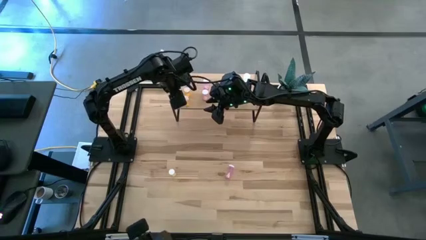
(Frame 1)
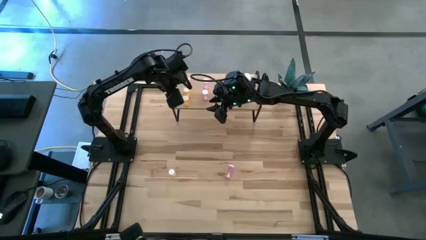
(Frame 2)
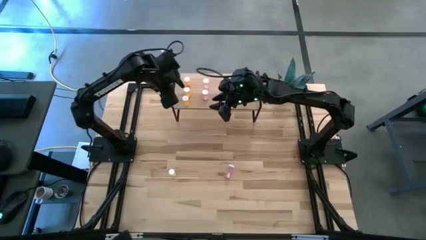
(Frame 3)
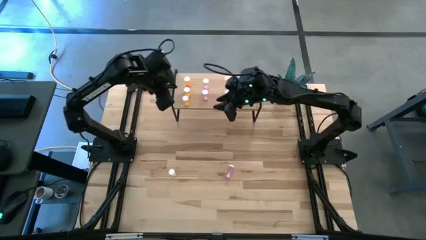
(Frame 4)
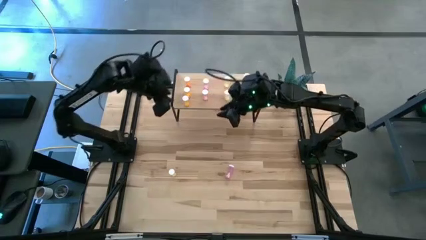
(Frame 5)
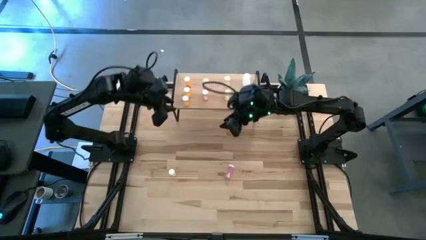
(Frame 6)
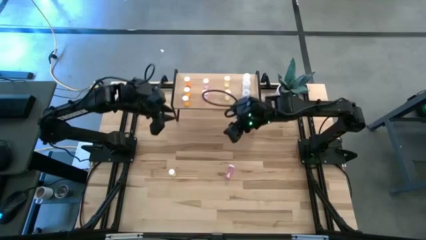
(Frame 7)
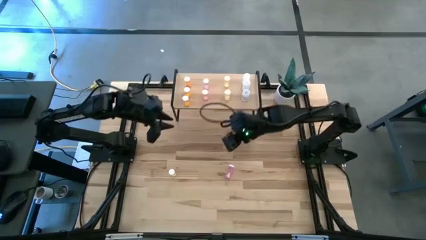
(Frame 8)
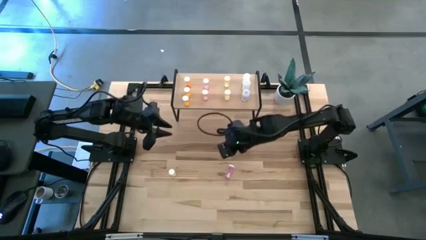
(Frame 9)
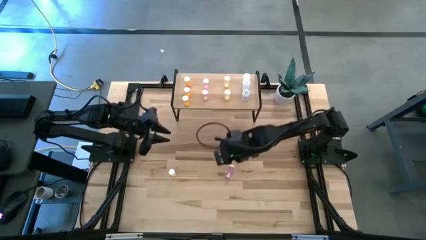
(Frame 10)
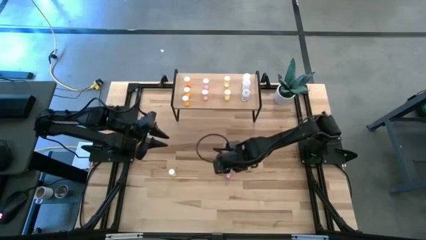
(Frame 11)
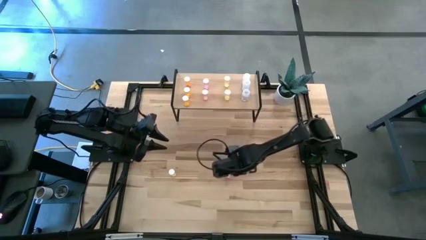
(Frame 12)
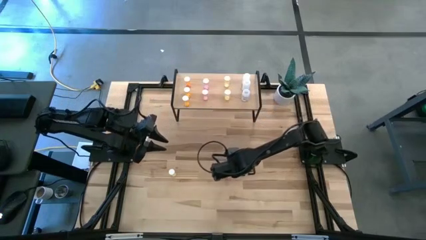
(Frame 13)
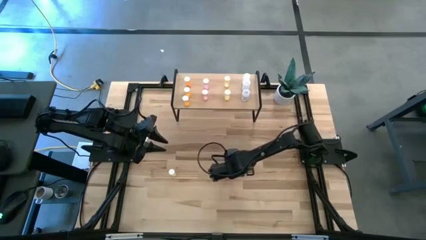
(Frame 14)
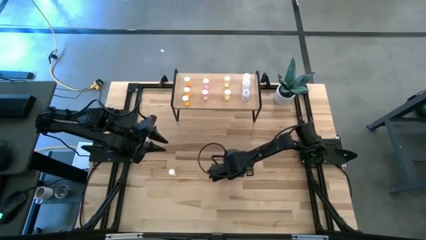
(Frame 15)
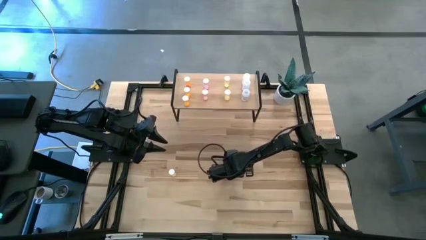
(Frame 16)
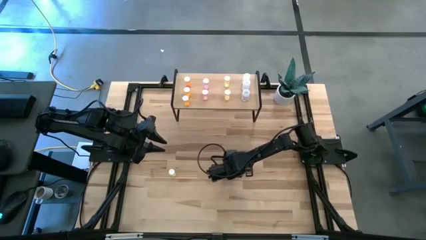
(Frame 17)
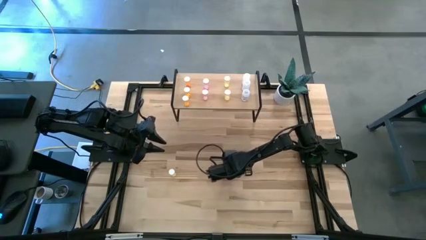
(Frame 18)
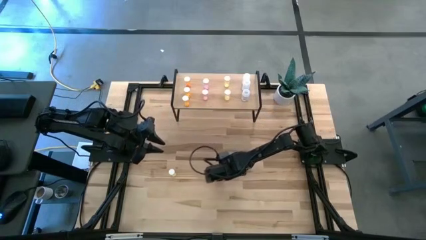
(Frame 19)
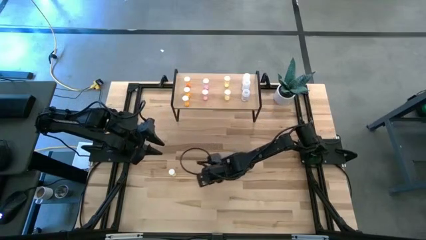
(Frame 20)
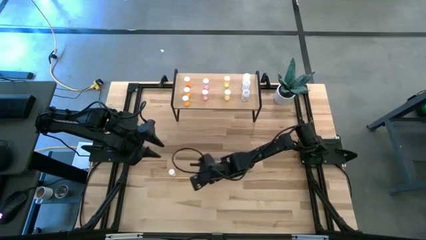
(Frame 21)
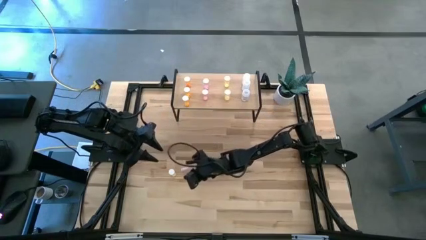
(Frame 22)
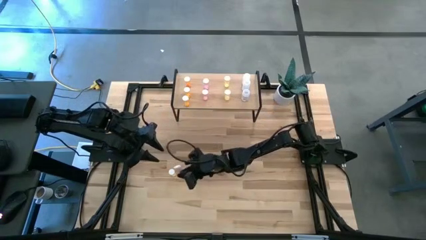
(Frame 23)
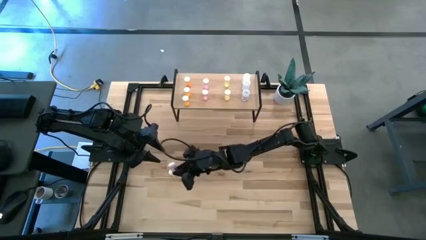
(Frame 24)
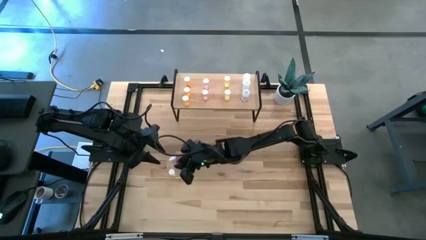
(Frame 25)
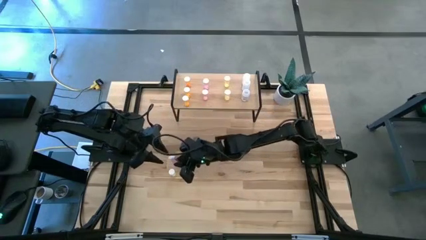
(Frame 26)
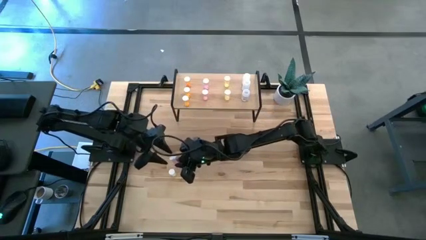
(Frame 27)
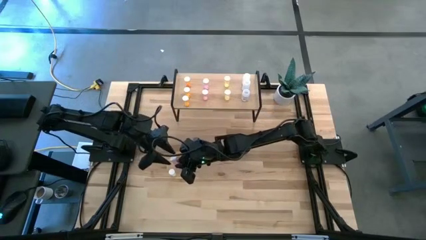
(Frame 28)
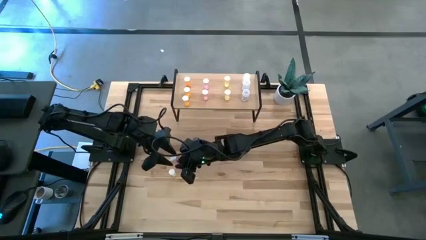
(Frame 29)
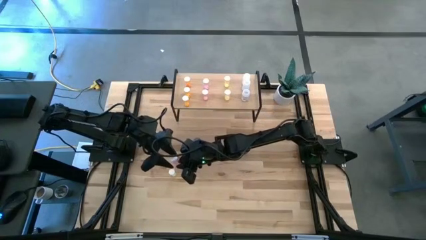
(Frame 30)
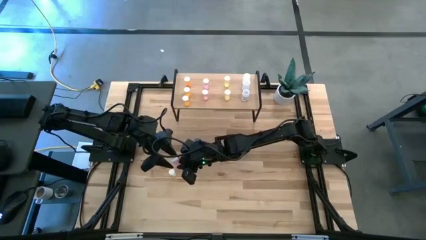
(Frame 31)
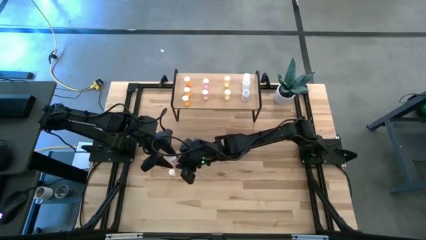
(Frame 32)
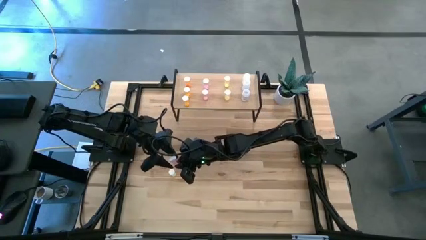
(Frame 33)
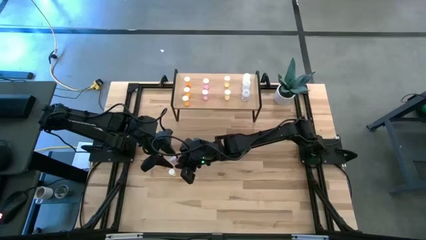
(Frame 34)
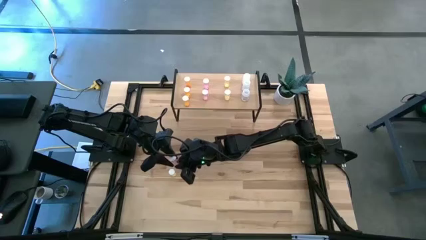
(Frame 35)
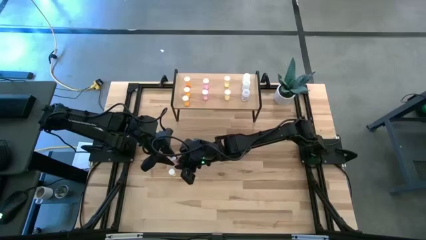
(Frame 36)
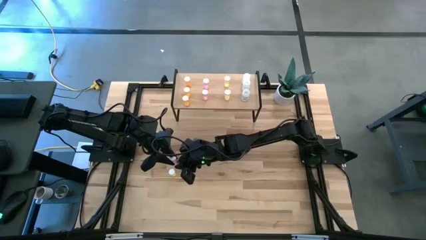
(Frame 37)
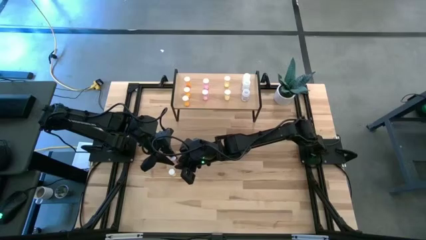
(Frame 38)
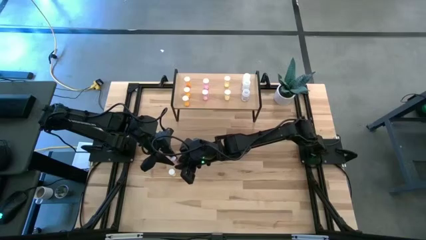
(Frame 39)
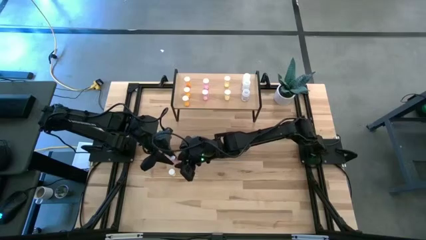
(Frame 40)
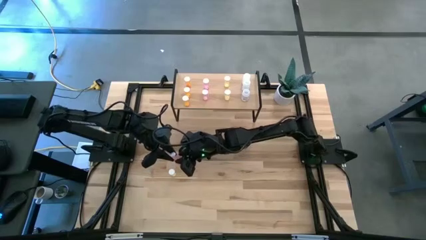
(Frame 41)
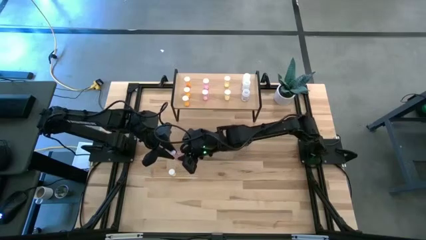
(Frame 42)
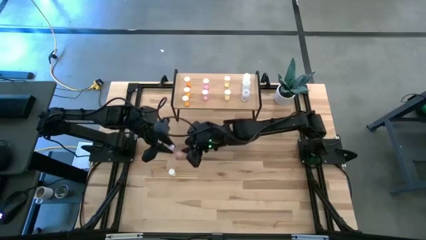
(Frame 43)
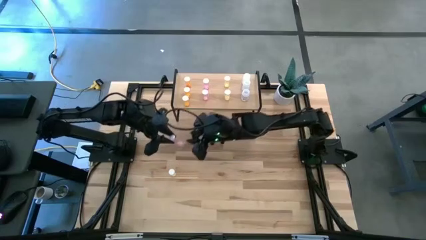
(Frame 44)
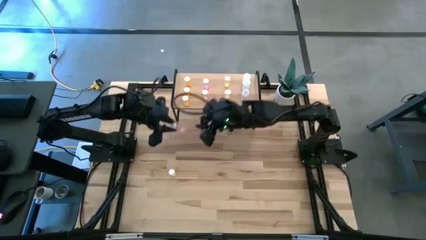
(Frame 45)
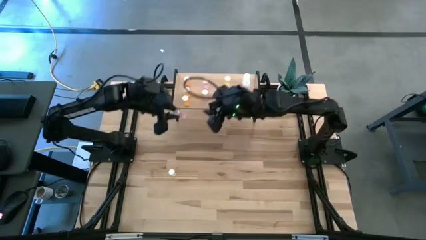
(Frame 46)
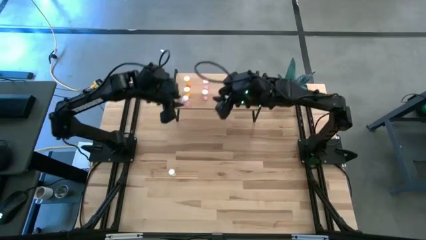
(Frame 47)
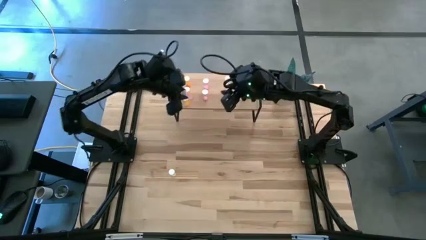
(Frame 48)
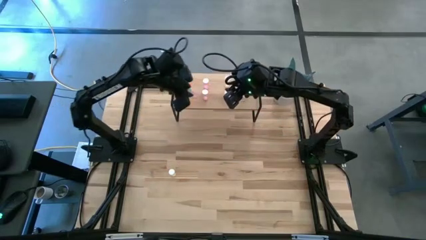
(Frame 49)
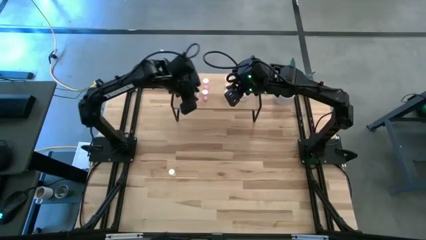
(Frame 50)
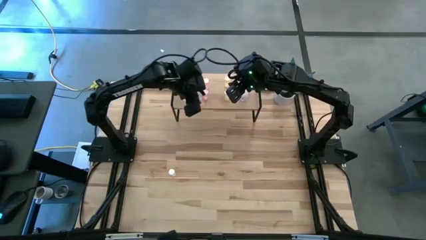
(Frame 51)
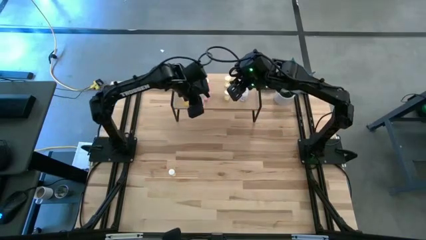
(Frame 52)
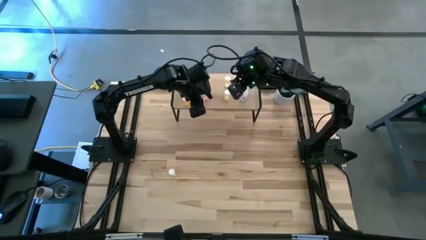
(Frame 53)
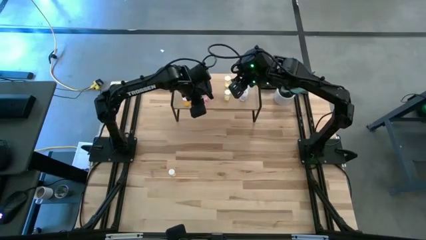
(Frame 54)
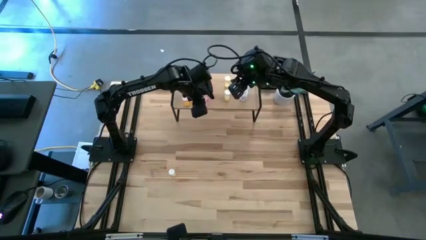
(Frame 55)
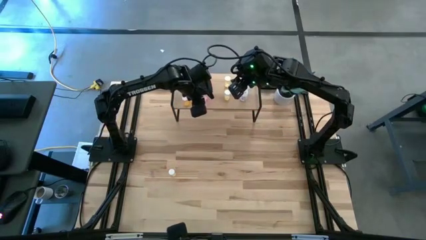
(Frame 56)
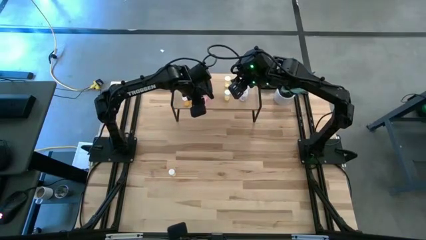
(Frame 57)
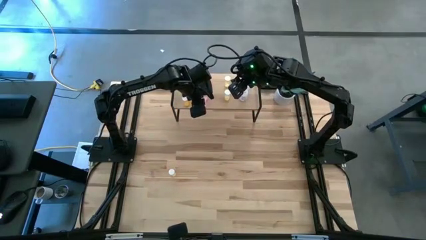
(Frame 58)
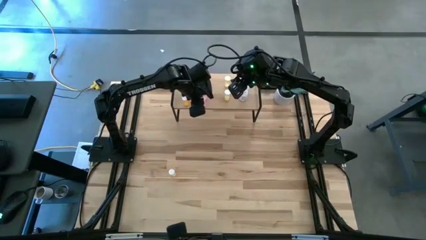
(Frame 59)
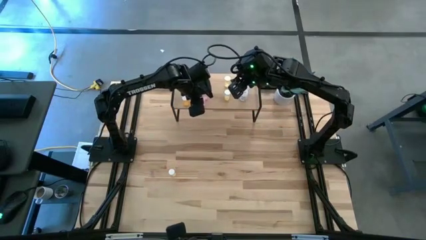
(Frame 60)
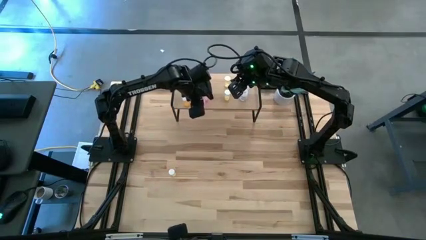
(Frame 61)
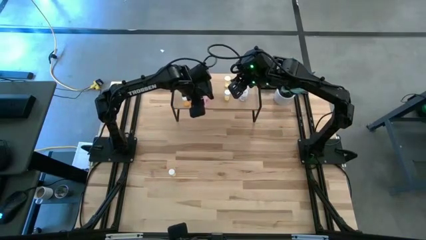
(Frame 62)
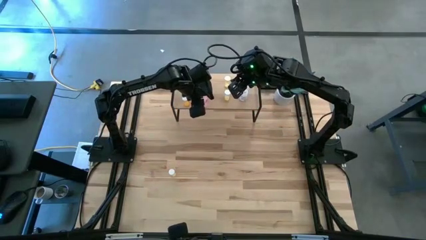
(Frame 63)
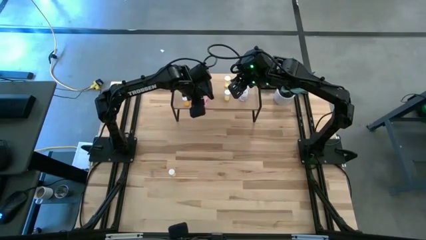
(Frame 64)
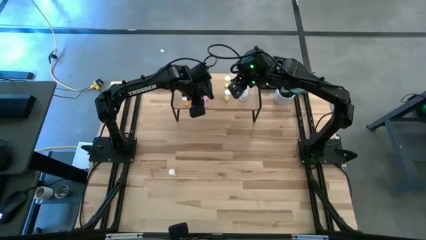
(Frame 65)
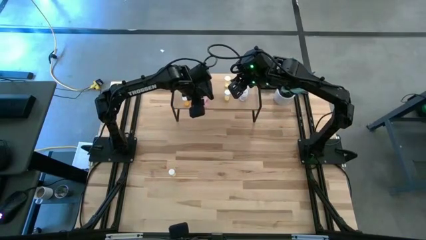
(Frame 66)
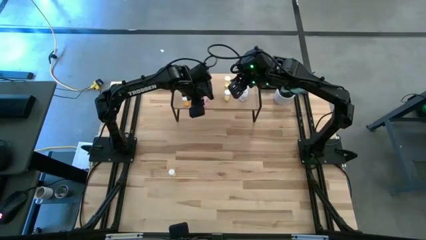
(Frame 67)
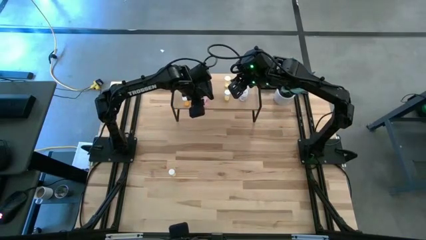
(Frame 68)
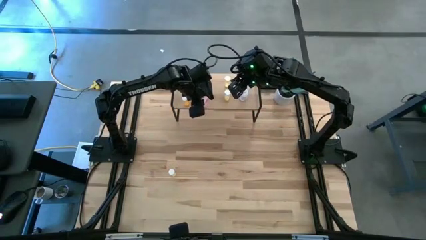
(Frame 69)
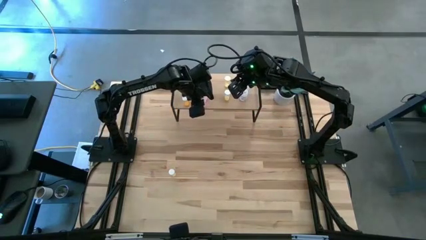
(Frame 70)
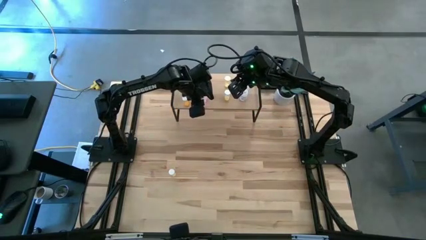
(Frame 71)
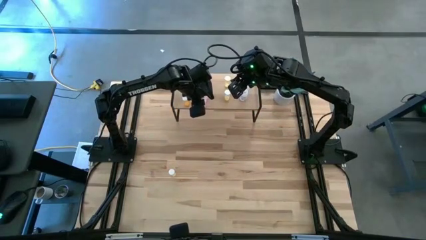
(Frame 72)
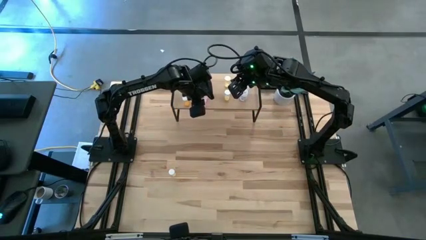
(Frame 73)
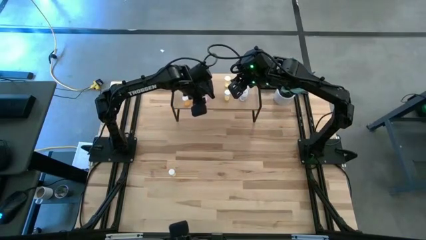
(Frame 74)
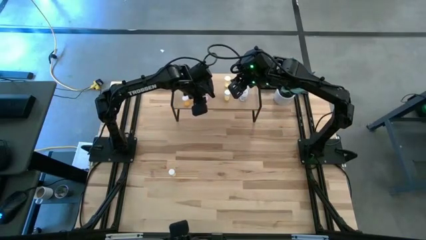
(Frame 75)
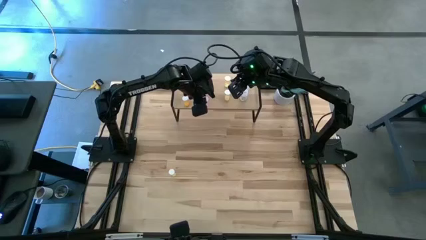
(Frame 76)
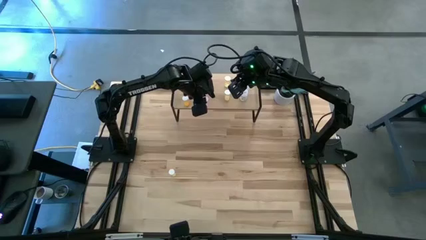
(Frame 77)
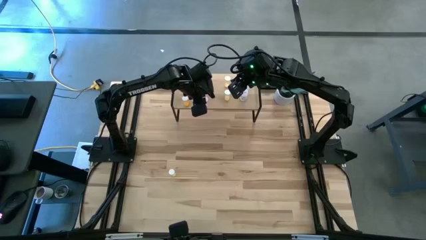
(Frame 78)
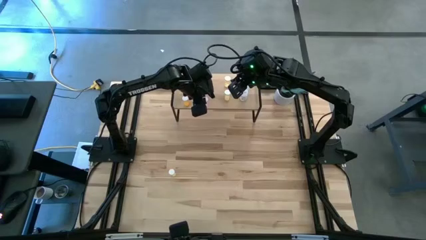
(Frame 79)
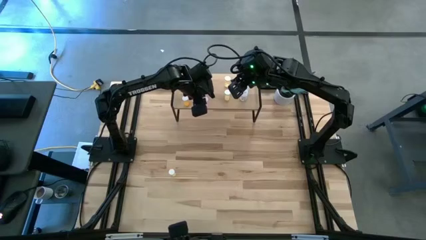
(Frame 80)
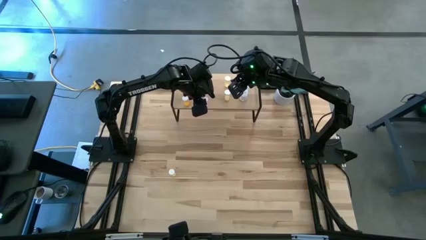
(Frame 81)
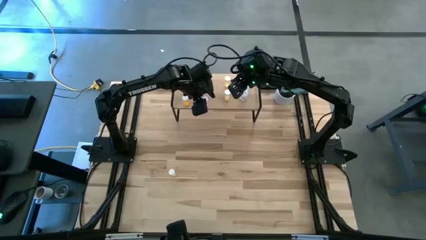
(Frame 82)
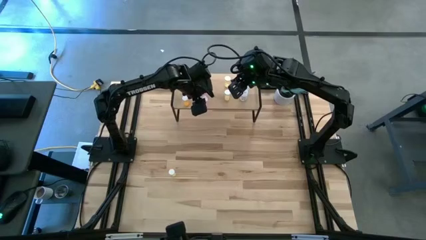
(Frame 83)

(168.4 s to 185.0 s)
Task: Pick and place medicine bottles onto shelf by color
Put the pink pill bottle on the shelf aligned with the other pink pill bottles
